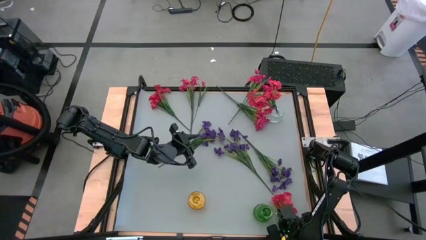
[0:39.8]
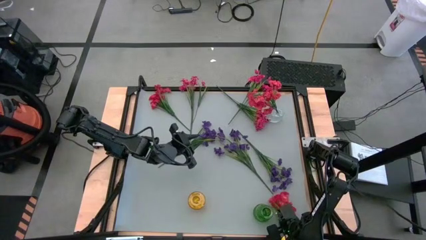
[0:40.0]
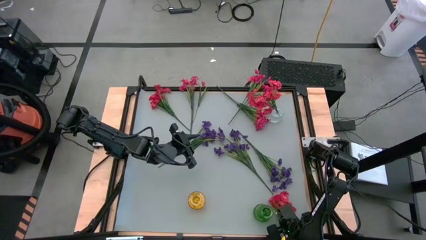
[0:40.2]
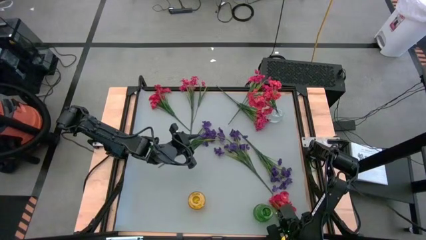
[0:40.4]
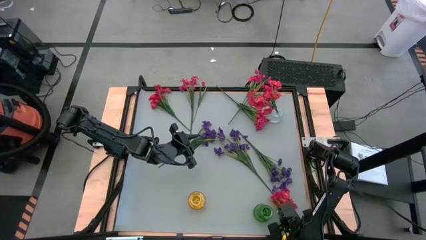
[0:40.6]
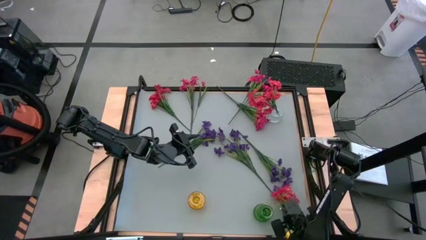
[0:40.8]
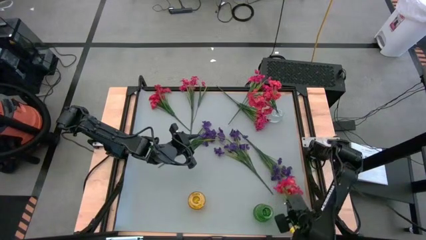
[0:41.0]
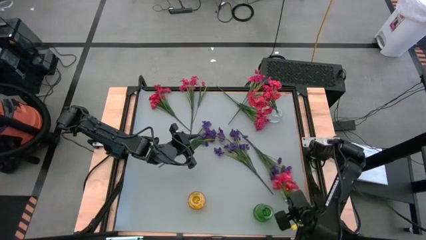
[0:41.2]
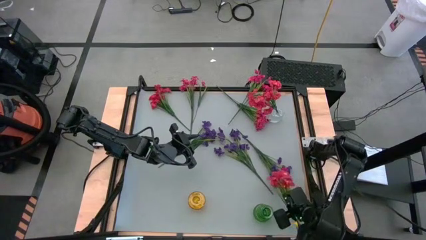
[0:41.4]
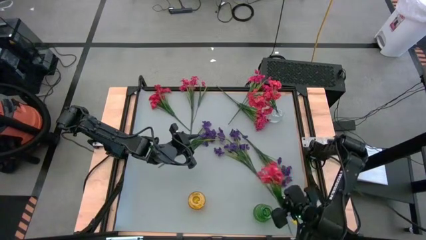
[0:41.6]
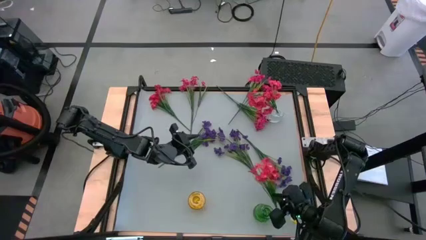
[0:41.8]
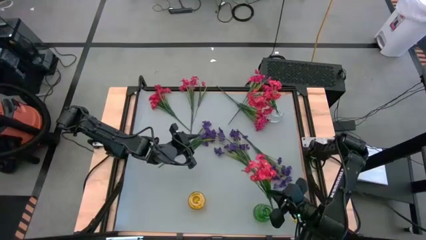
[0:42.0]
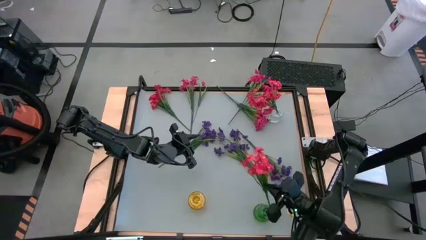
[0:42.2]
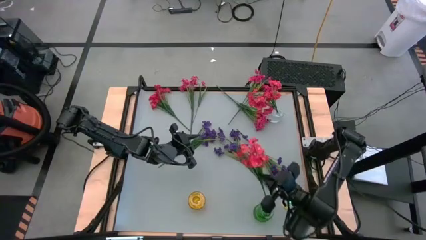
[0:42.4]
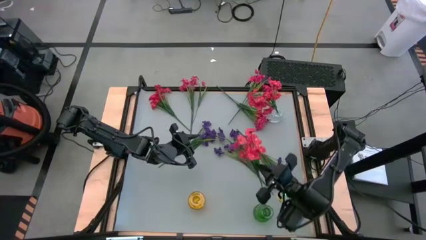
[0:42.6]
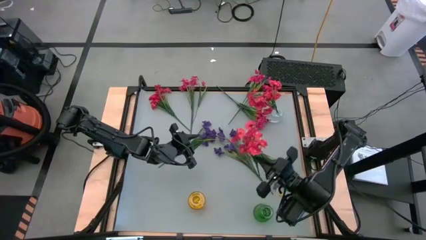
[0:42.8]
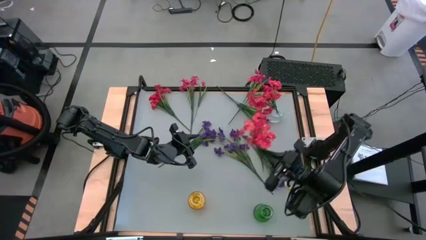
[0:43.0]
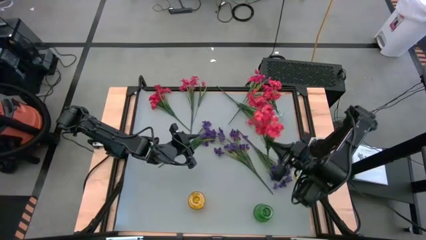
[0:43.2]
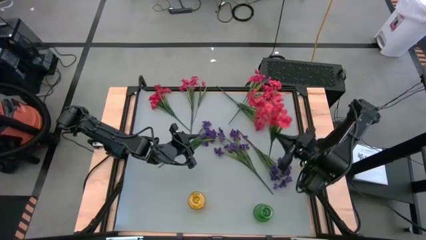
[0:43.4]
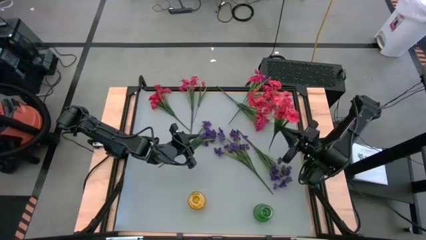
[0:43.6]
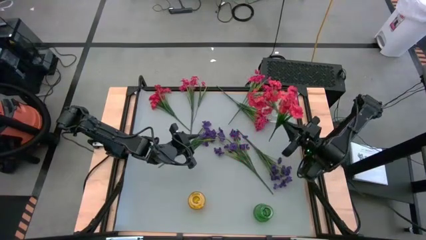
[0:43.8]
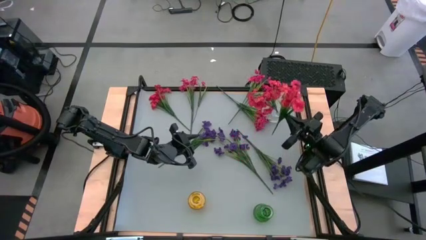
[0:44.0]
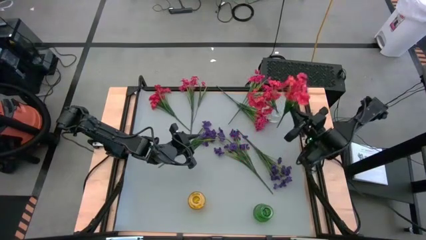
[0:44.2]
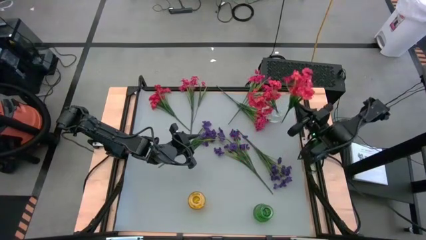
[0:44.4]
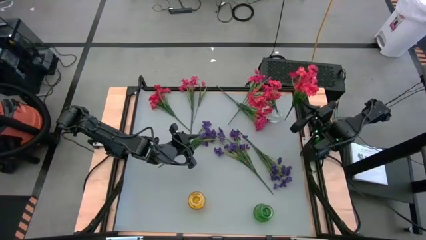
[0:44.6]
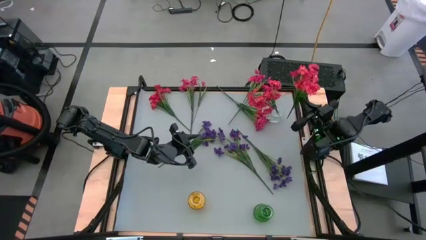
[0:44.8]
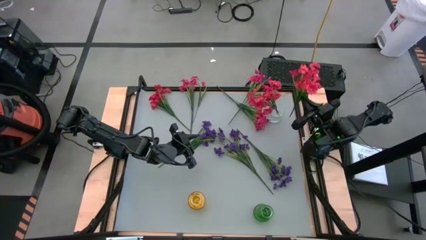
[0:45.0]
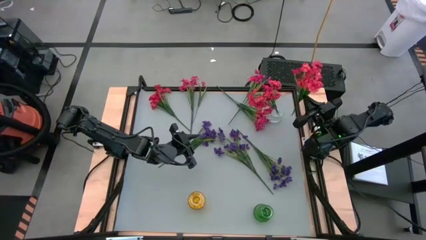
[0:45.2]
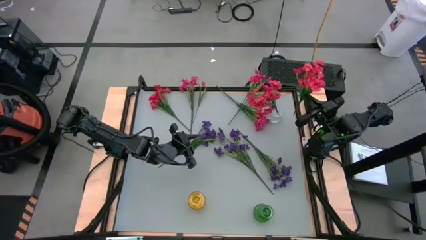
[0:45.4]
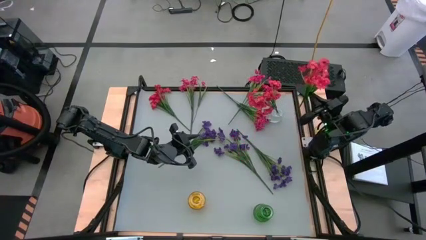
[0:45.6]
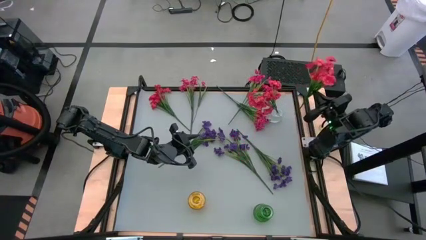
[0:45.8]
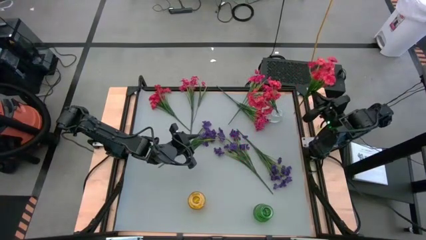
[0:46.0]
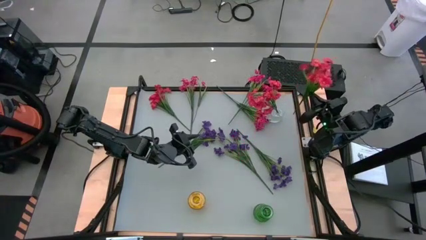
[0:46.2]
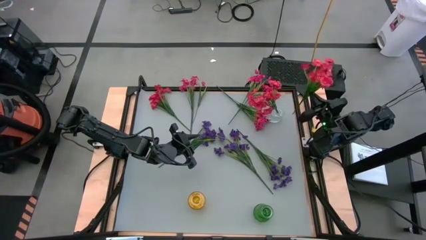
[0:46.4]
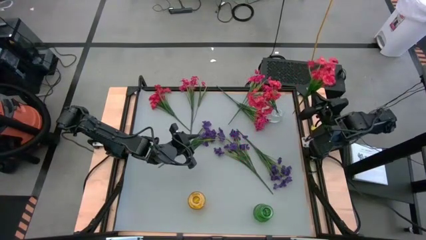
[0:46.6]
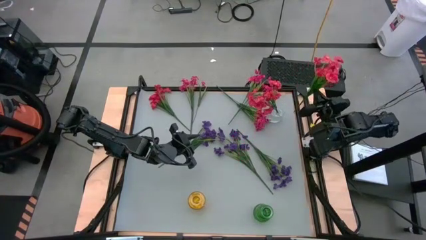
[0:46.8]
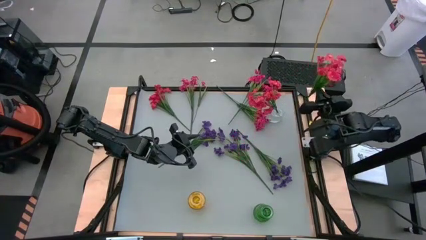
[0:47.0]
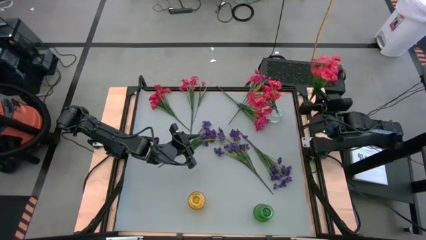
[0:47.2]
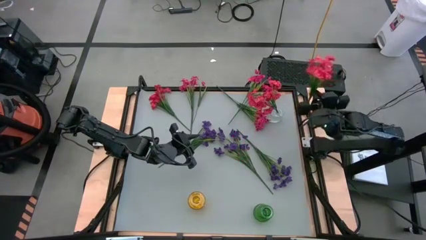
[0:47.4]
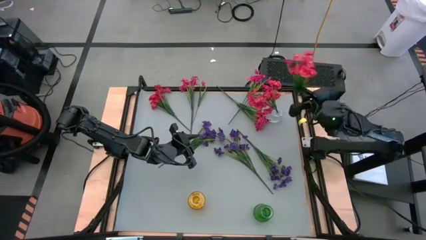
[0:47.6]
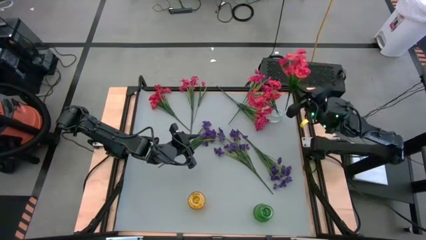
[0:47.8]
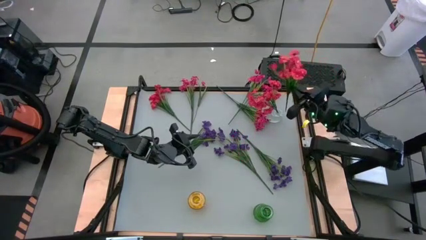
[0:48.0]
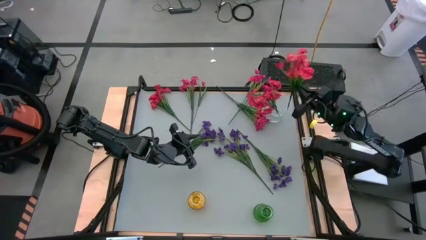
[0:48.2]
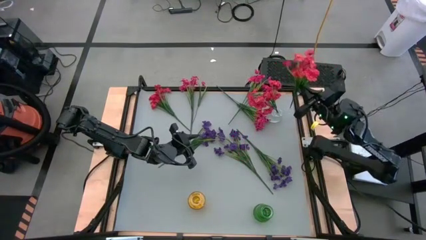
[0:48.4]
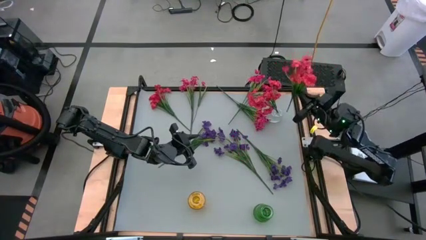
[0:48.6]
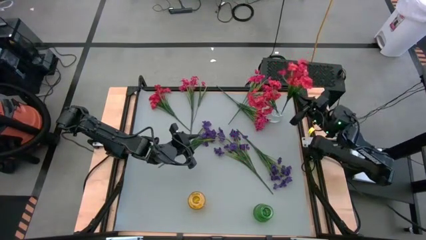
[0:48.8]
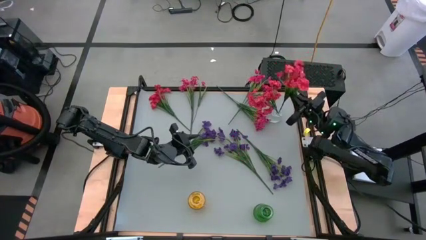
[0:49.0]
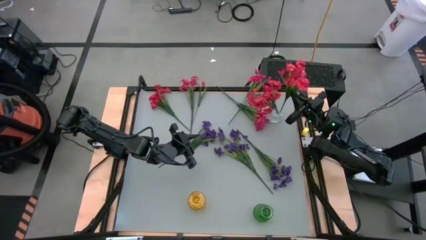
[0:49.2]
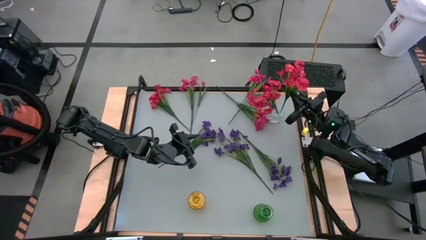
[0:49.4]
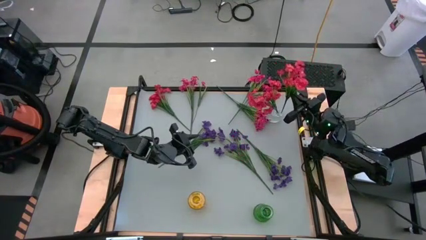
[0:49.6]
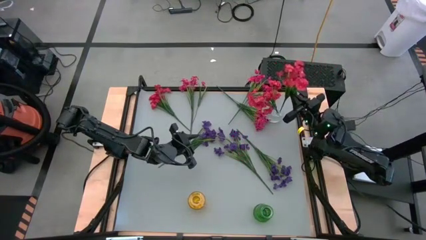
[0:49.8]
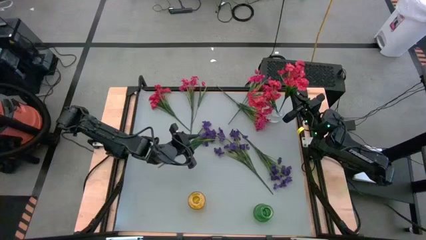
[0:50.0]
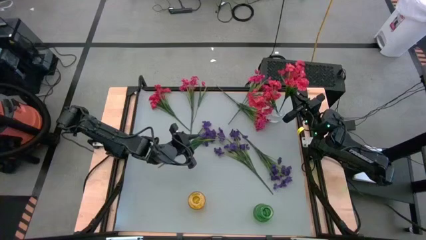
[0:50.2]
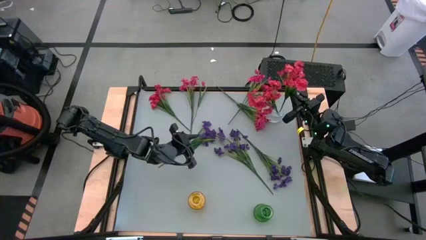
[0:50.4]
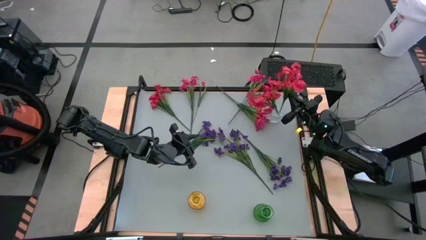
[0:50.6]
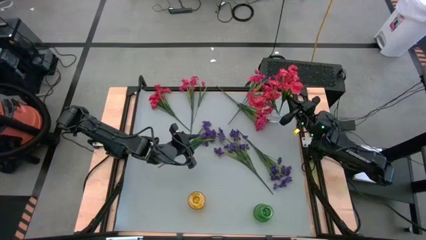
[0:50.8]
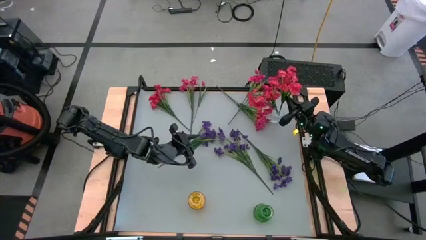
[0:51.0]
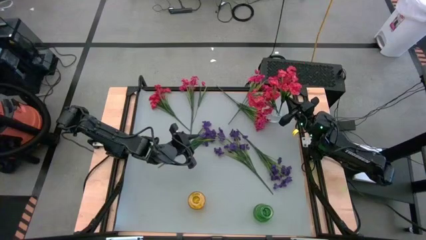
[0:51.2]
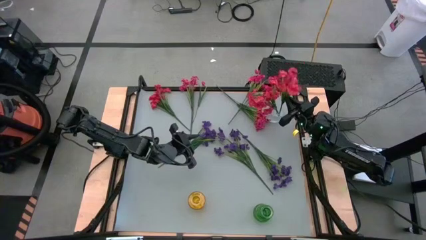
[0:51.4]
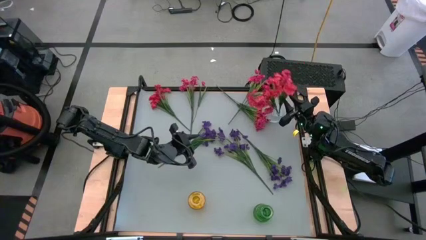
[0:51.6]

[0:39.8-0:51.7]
Task: Sort flowers into vase by color
Put the bottom red flower into the transparent vase

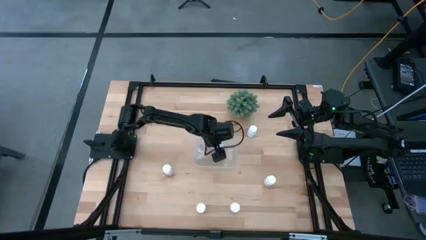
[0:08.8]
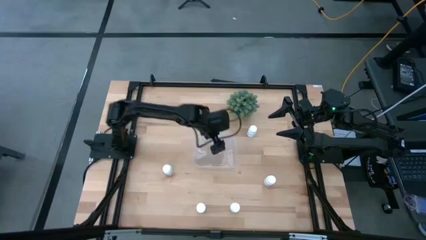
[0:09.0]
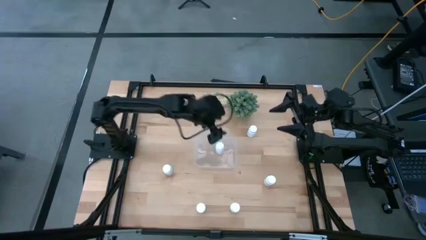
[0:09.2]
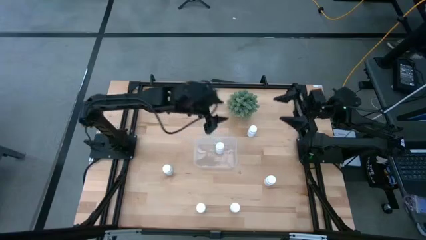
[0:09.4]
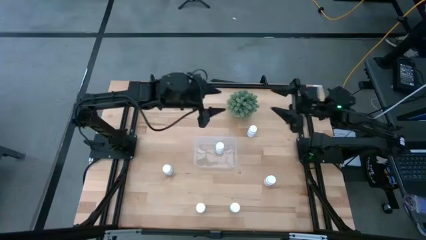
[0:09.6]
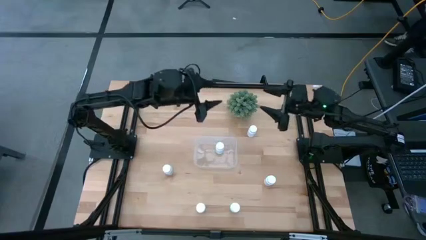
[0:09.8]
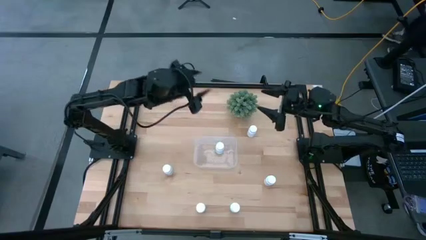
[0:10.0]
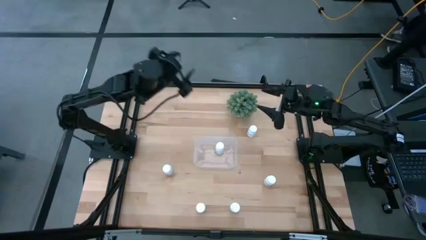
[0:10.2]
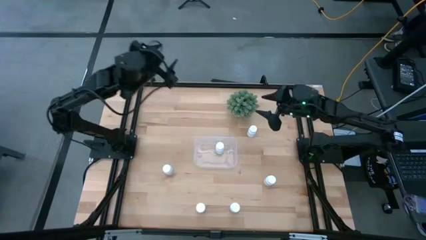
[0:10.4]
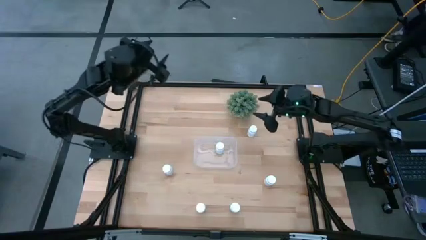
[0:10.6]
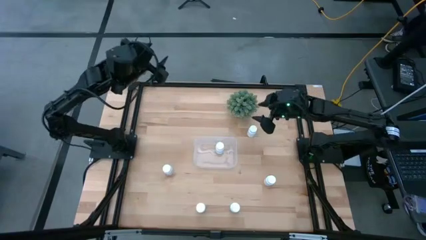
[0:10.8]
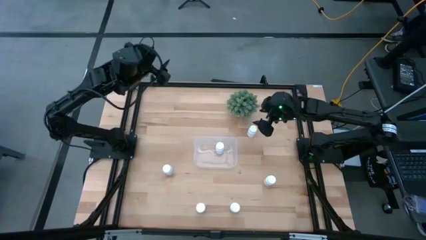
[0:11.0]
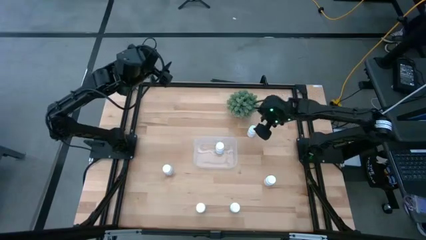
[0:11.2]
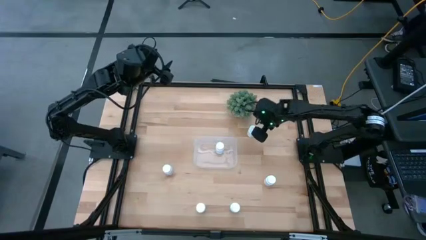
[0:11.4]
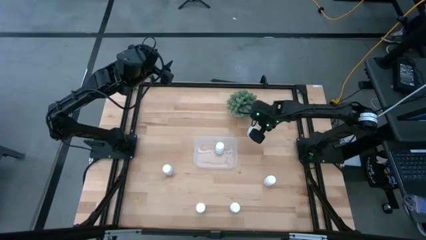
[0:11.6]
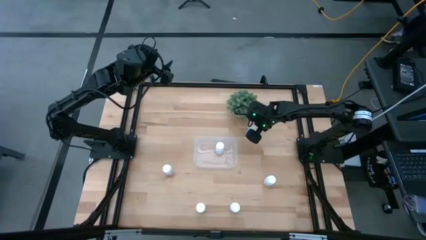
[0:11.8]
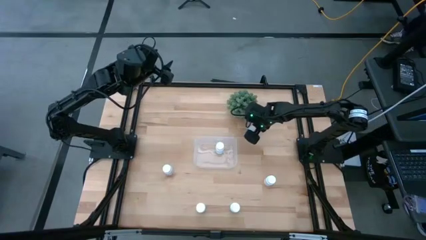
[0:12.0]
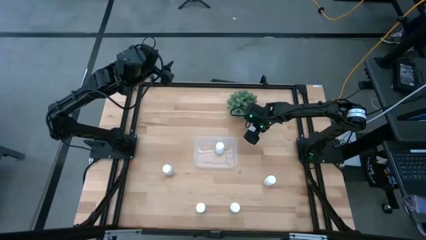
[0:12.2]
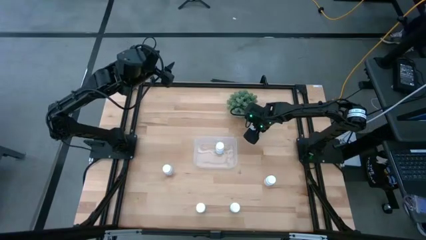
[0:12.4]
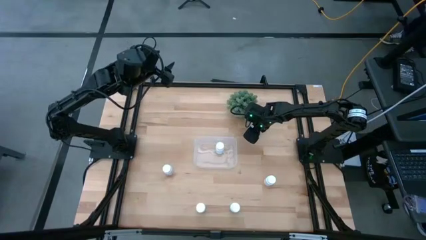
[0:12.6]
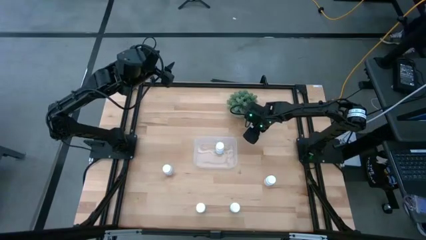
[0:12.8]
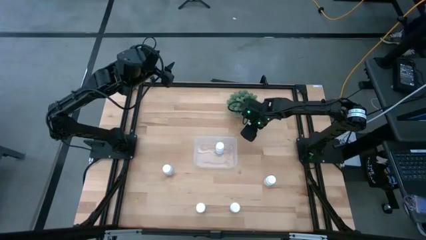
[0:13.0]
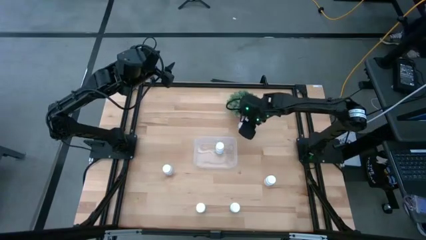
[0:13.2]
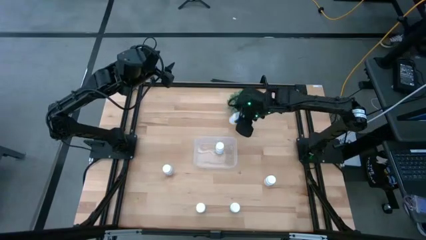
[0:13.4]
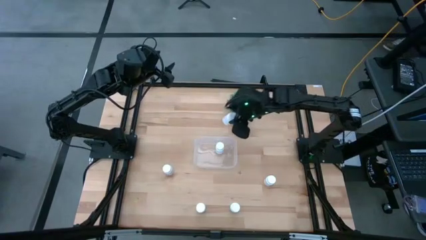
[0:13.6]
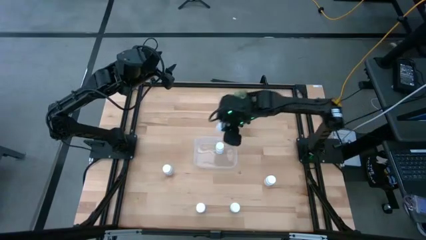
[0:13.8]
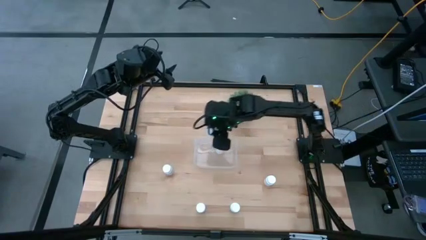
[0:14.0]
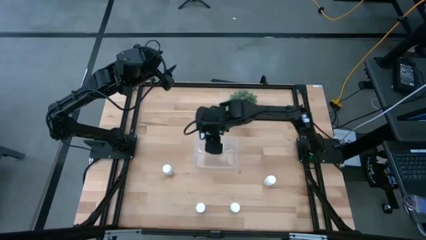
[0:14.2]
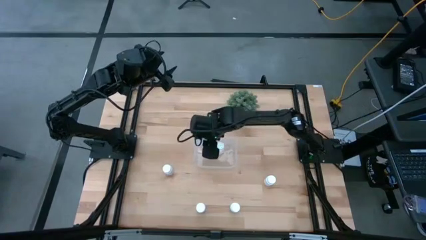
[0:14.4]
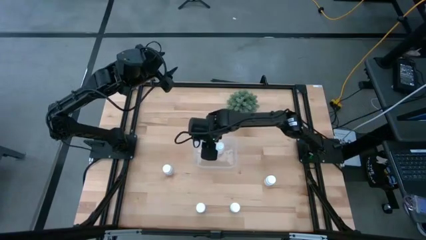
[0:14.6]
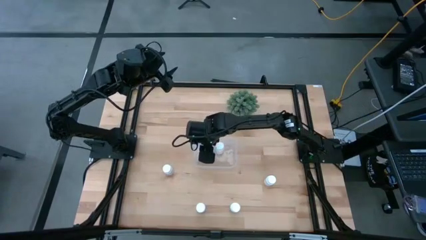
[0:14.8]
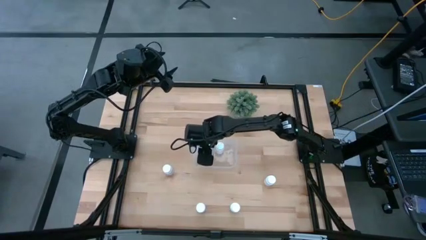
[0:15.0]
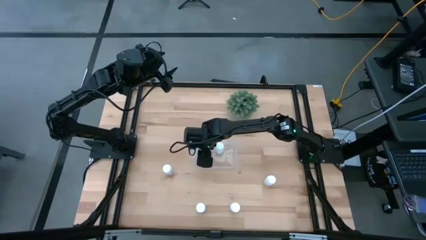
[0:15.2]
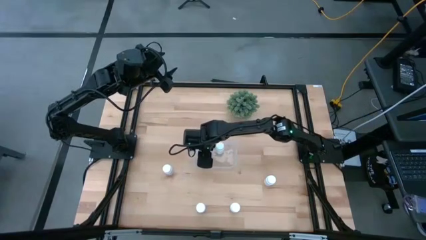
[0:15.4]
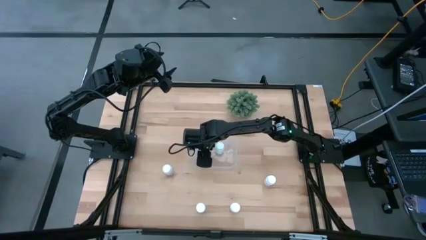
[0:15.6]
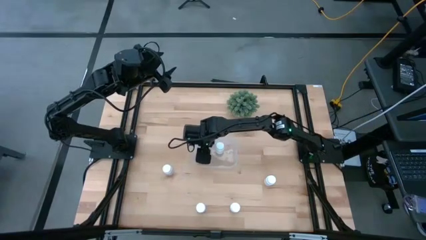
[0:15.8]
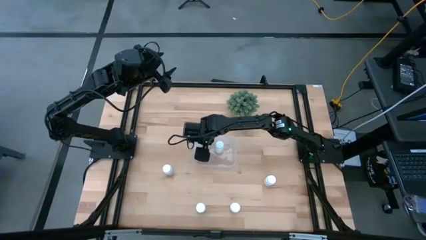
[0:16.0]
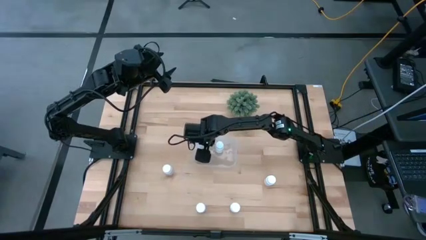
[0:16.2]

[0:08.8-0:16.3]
Task: Pick and place pill bottles into a basket
Put the white pill bottle into the transparent bin
